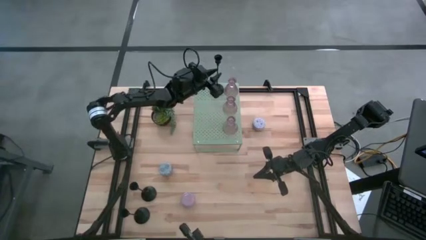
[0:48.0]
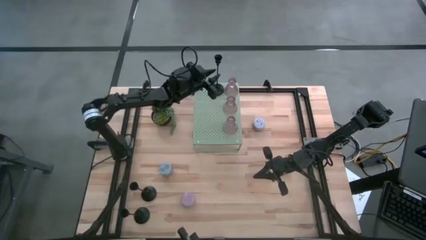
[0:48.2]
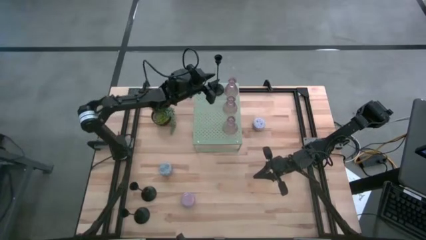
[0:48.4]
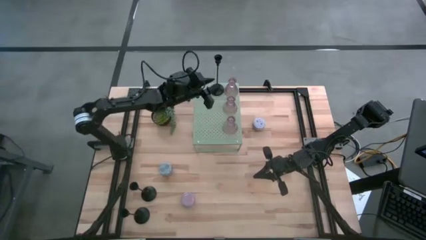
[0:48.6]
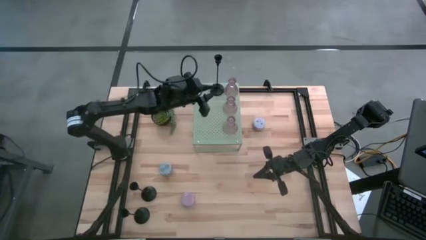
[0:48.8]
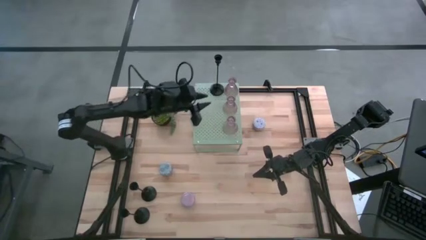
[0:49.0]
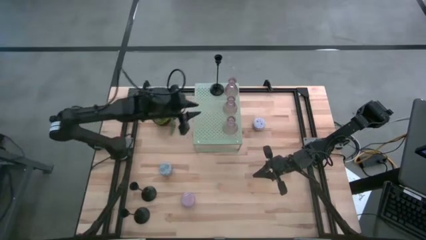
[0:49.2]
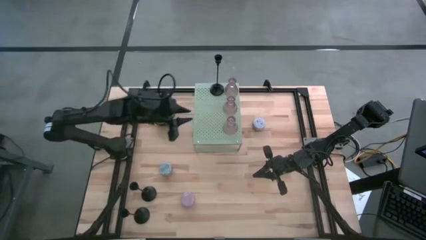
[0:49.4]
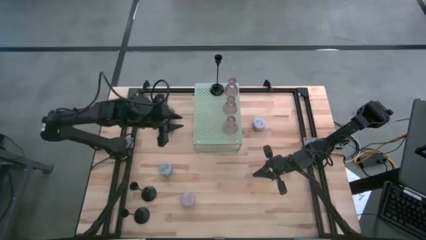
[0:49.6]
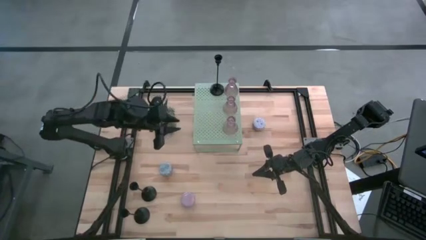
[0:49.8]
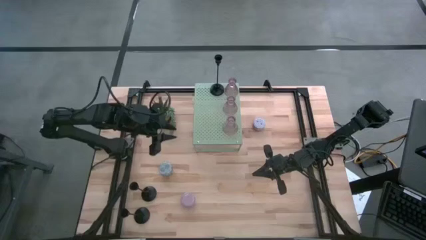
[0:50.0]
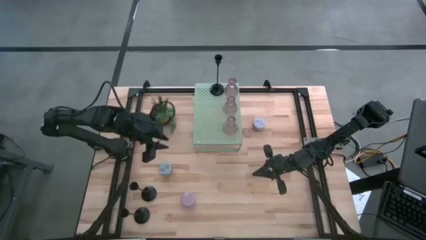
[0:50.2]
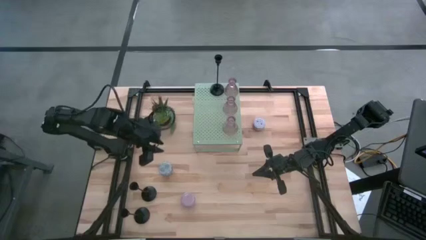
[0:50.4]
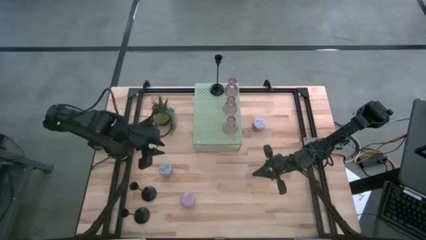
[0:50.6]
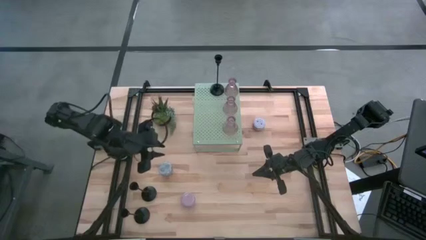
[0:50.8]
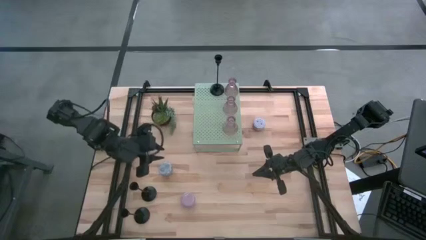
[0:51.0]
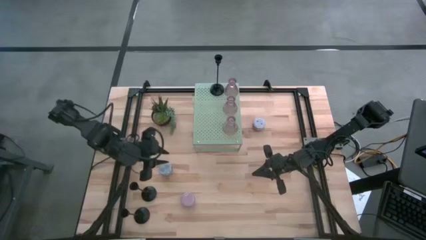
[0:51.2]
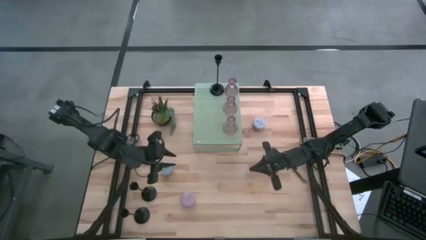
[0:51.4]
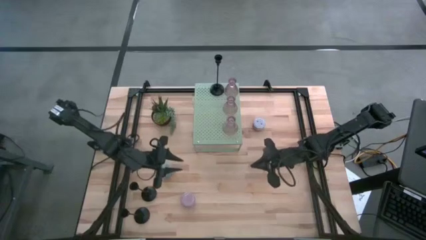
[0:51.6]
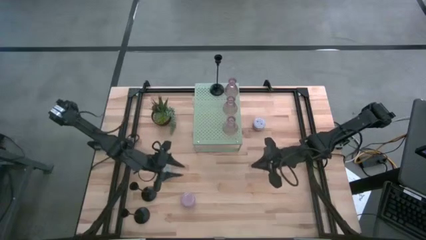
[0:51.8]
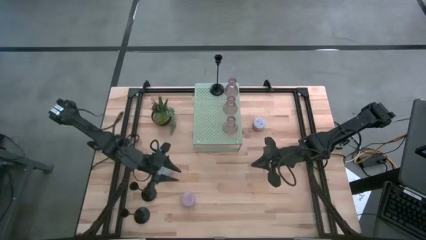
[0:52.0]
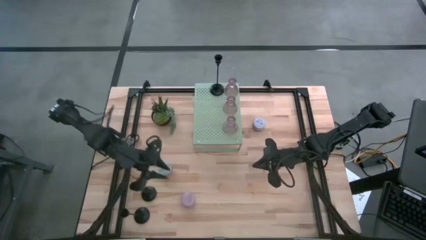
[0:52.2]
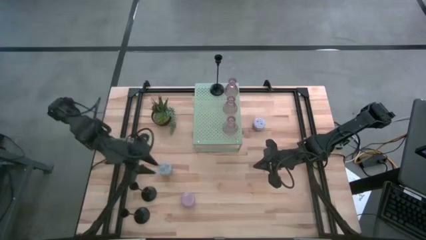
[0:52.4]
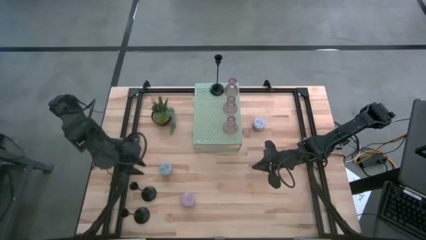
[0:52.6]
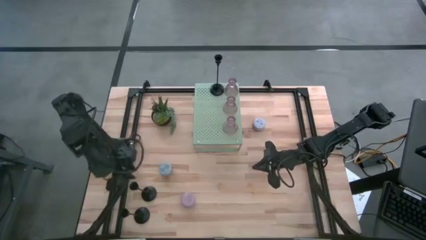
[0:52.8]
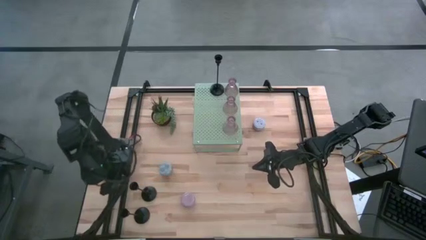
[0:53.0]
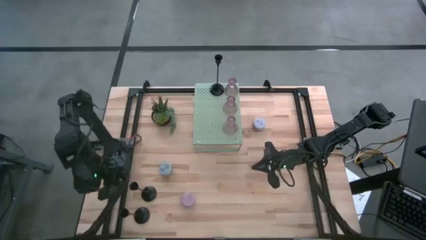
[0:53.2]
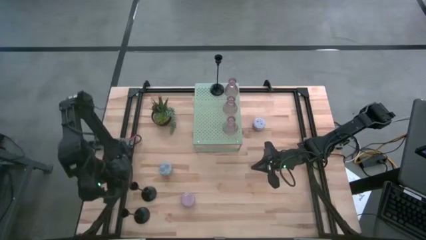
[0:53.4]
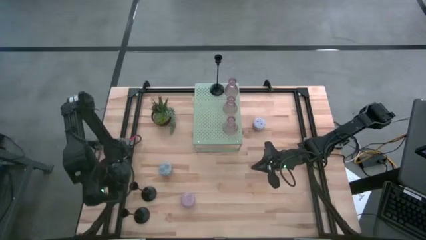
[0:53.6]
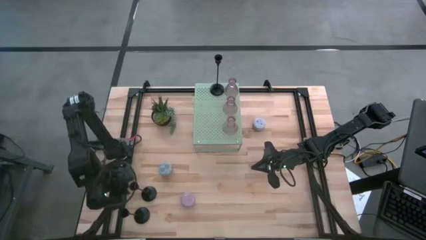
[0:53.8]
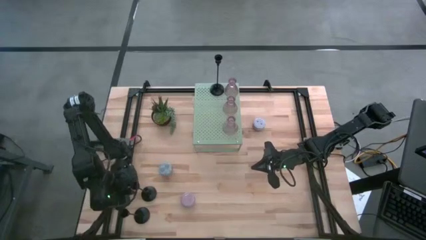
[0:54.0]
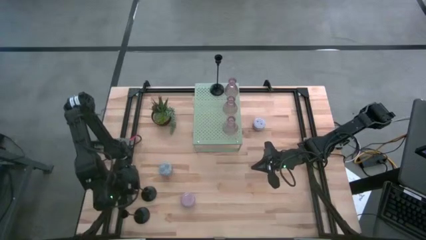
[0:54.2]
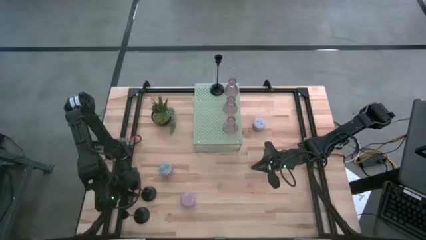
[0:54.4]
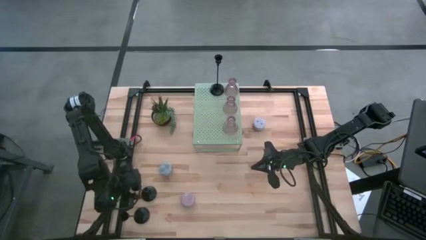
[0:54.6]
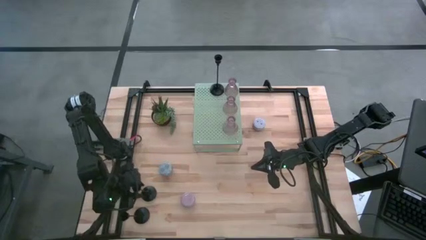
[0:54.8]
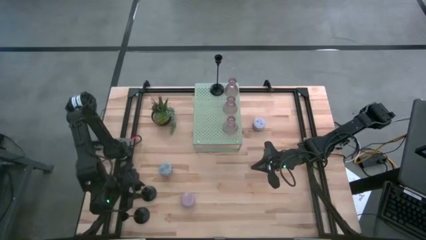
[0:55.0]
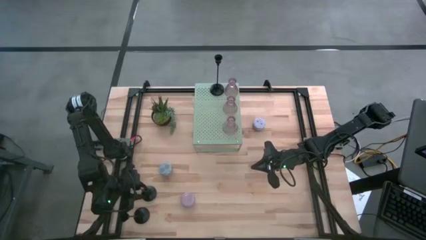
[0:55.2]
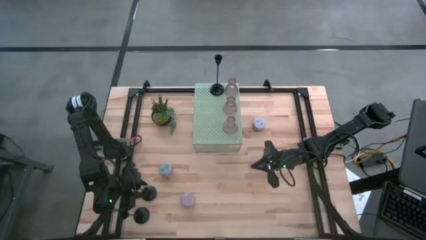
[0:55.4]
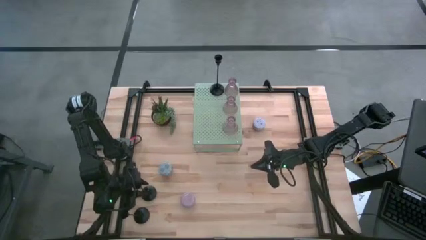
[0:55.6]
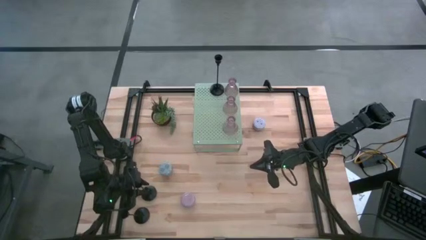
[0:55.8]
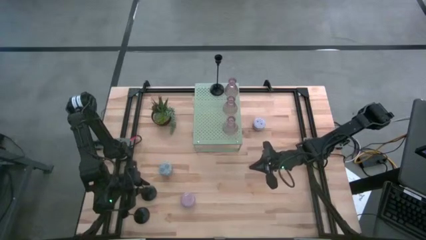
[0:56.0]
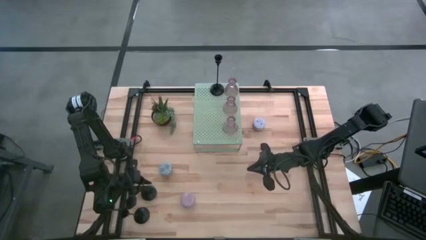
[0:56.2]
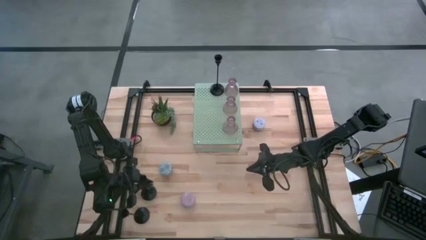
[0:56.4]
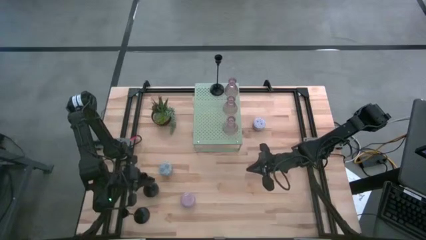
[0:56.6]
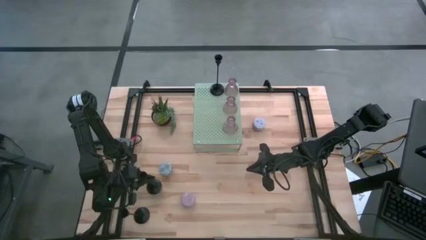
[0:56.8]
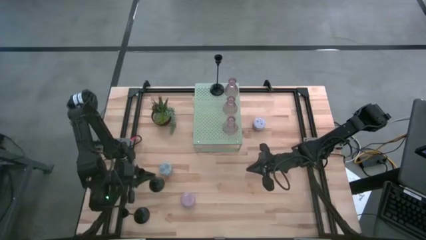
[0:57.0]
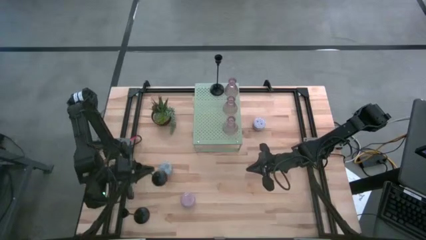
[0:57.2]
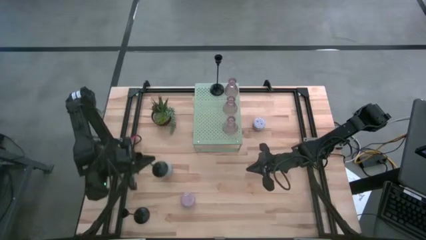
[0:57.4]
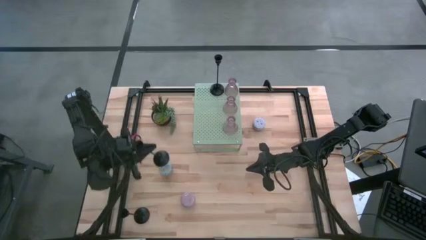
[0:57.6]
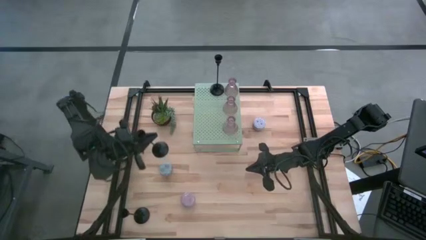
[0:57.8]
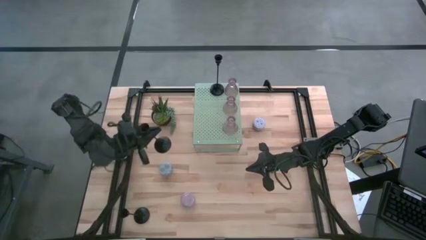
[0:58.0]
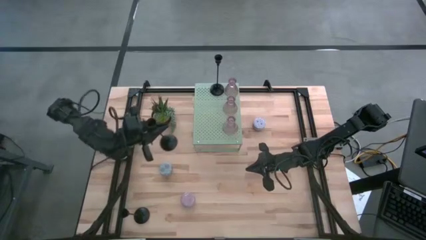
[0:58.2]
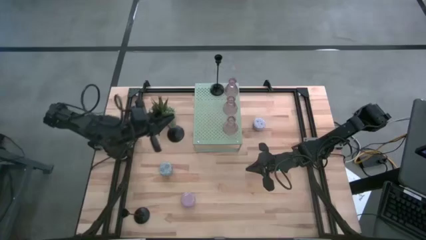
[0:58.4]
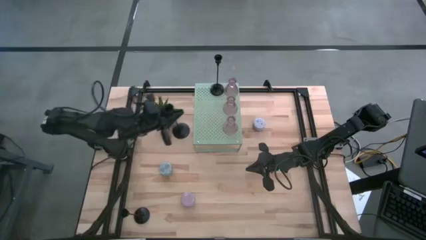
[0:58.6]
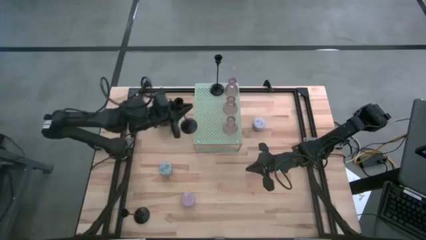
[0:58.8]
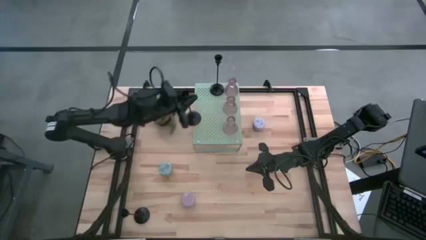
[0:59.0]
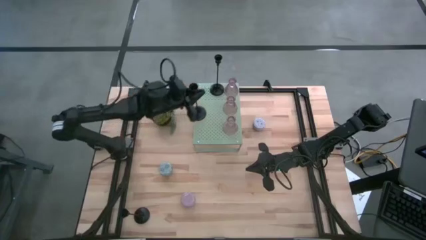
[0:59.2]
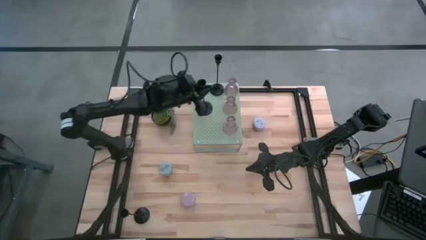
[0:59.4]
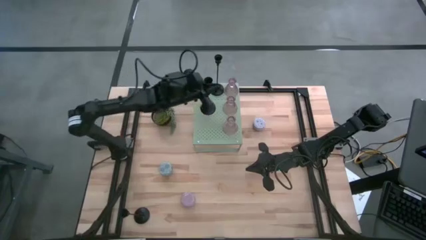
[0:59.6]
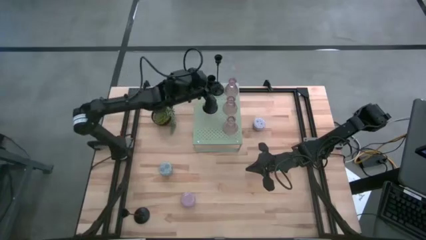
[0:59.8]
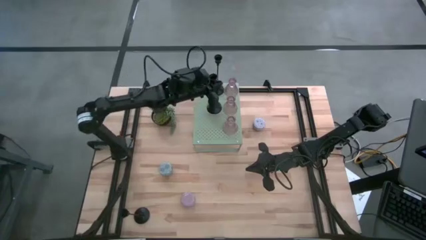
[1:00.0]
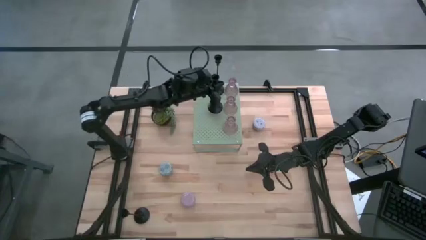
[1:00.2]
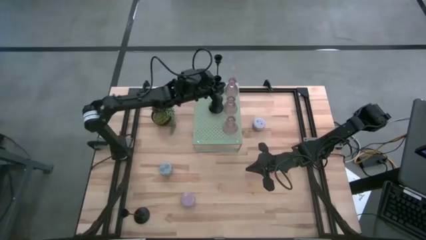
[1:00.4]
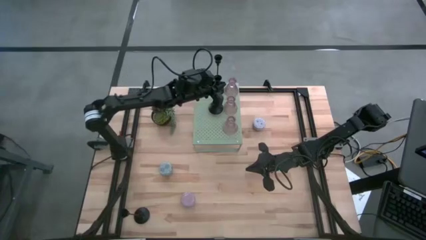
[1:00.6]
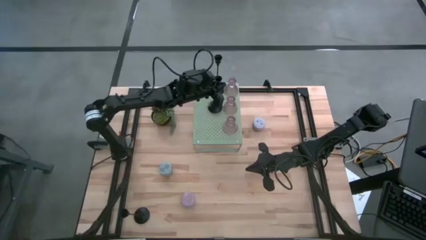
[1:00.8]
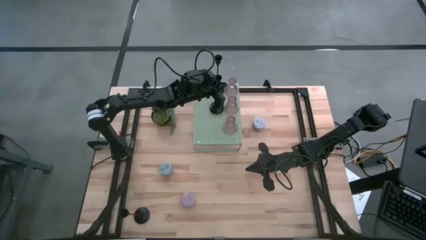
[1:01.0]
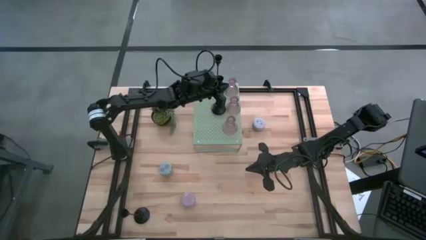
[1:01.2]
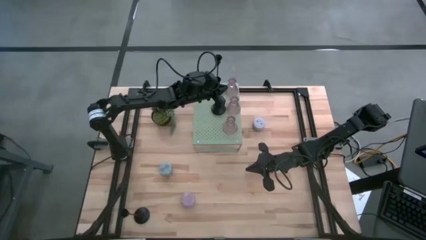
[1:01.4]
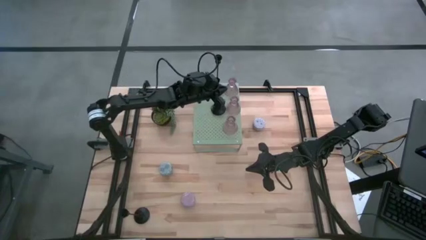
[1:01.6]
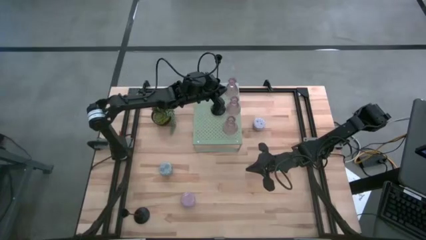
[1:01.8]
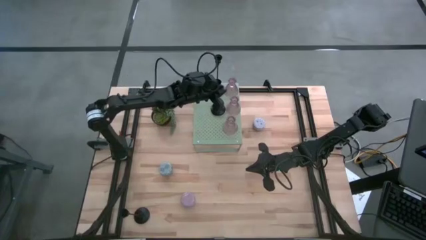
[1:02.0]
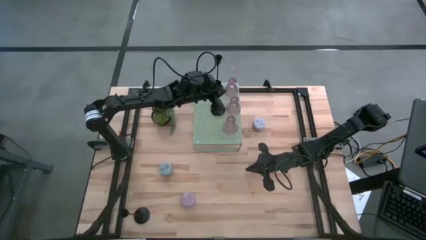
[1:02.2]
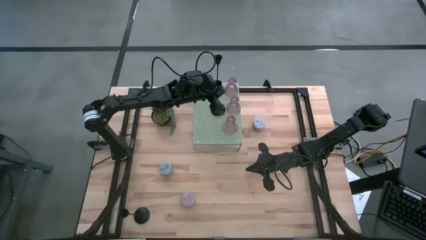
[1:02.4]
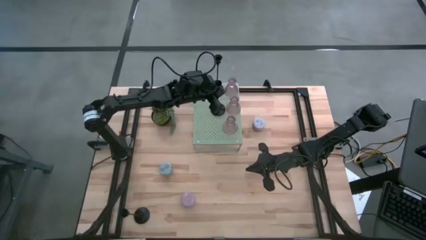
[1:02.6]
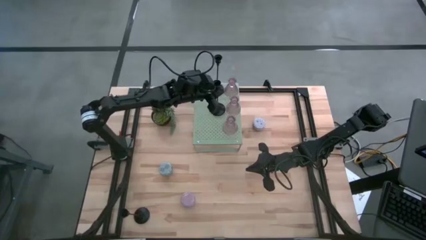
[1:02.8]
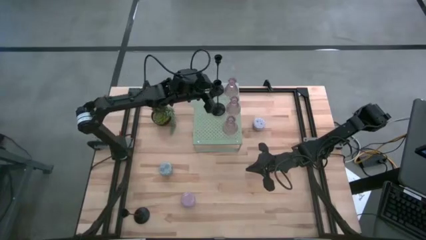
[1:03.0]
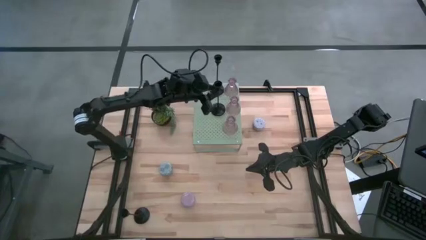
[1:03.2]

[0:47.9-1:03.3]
Task: Pick & Place candle stick holders
Put the top black candle holder on the shelf aligned with the other black candle holder
